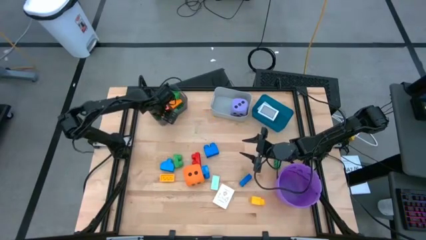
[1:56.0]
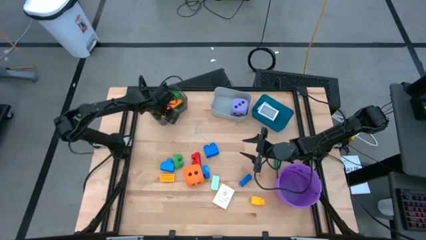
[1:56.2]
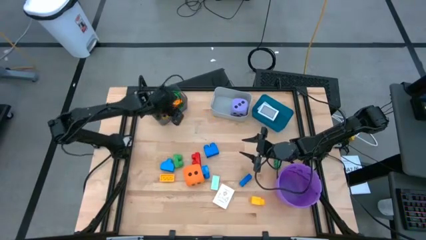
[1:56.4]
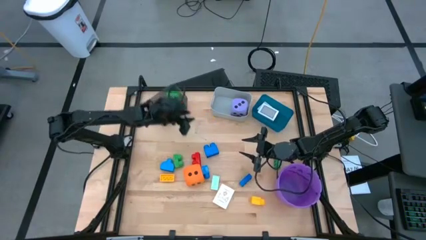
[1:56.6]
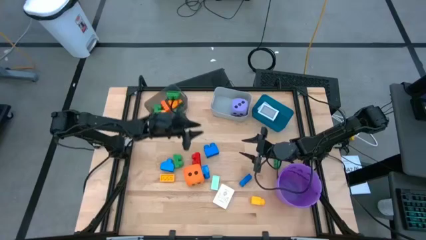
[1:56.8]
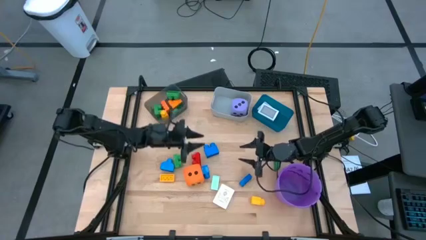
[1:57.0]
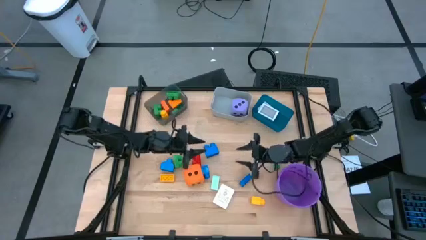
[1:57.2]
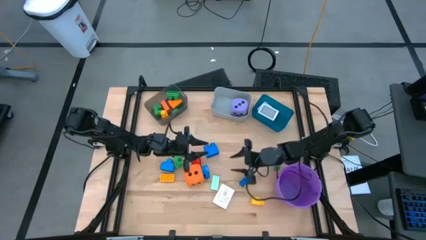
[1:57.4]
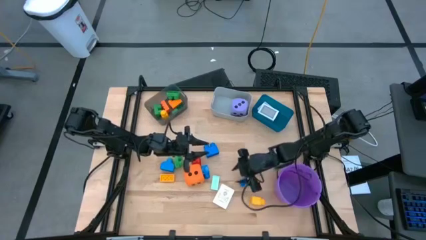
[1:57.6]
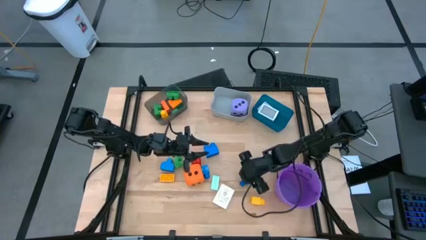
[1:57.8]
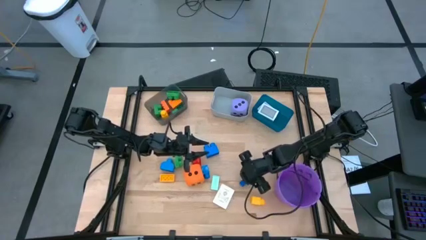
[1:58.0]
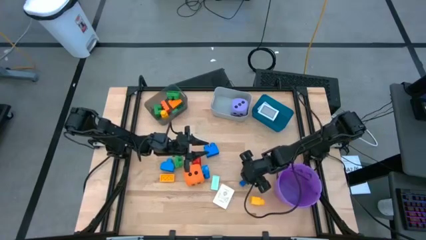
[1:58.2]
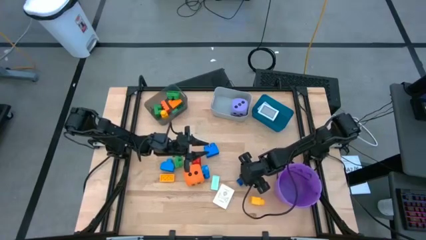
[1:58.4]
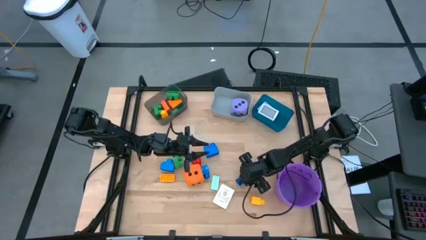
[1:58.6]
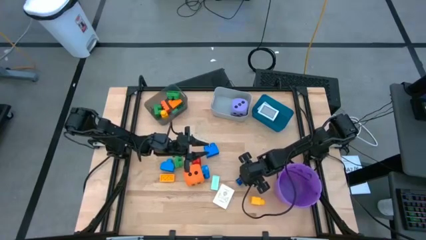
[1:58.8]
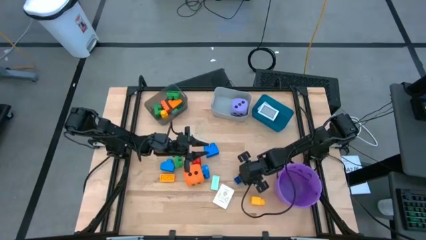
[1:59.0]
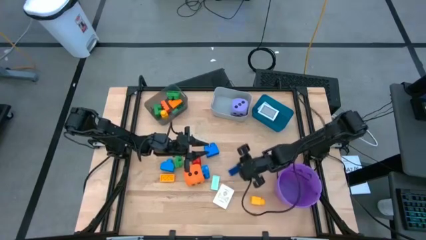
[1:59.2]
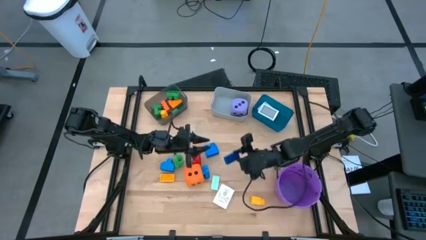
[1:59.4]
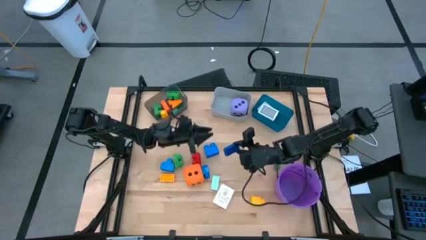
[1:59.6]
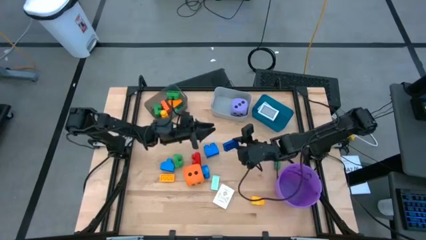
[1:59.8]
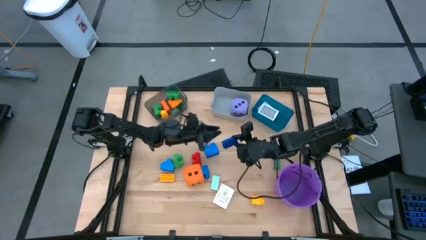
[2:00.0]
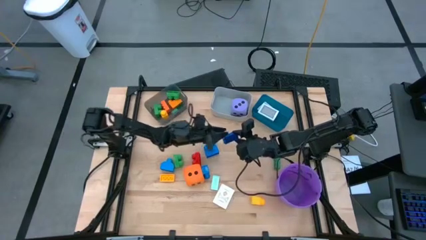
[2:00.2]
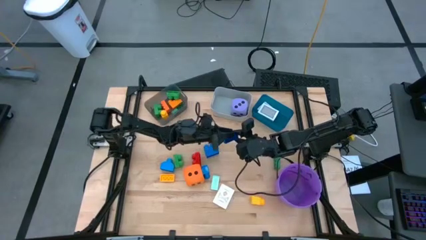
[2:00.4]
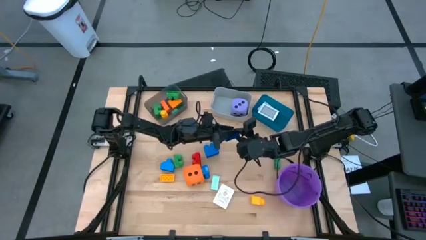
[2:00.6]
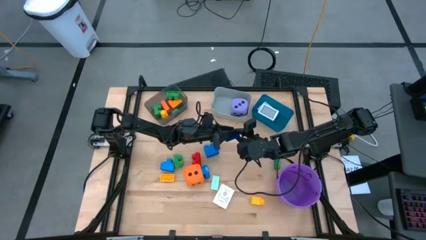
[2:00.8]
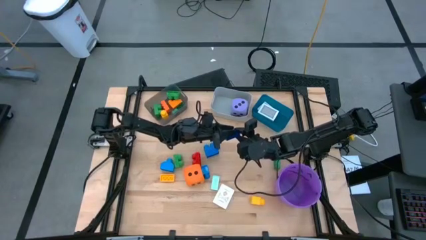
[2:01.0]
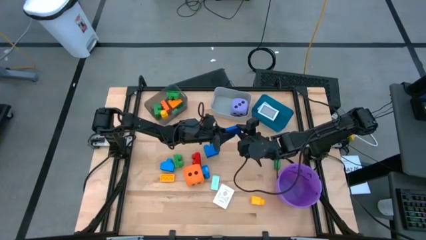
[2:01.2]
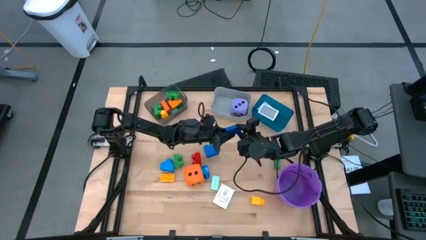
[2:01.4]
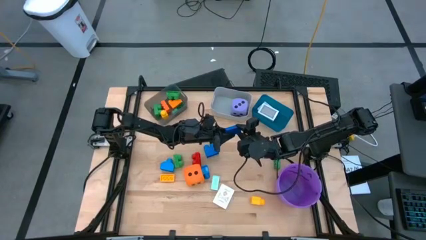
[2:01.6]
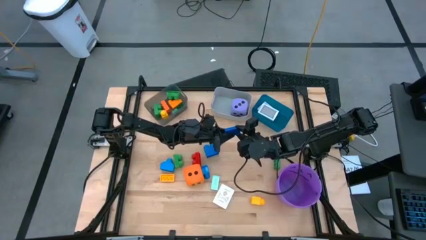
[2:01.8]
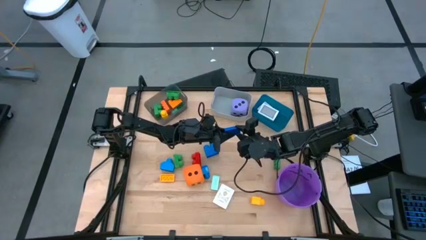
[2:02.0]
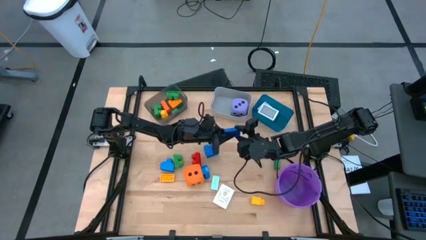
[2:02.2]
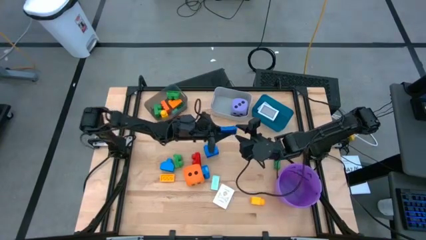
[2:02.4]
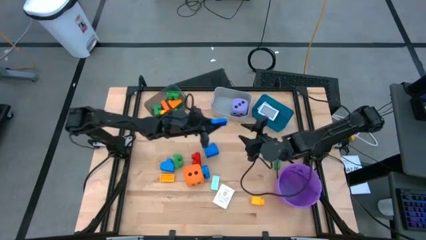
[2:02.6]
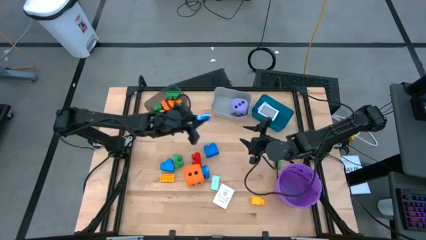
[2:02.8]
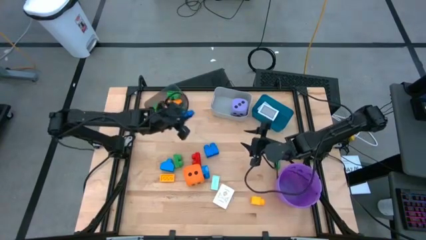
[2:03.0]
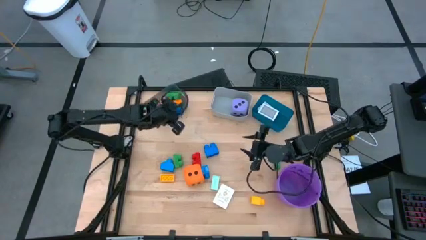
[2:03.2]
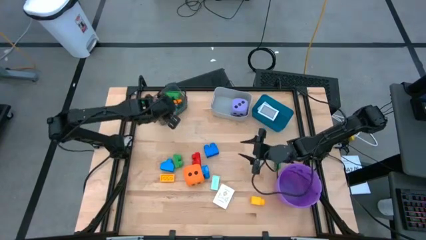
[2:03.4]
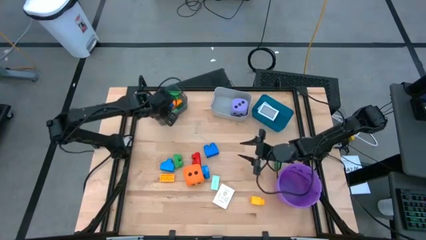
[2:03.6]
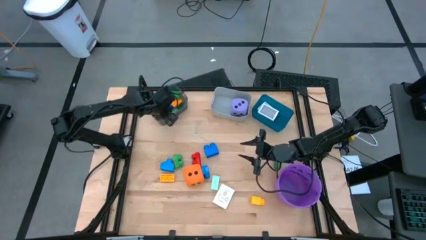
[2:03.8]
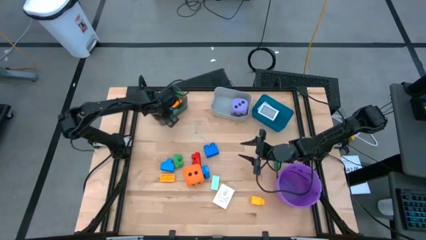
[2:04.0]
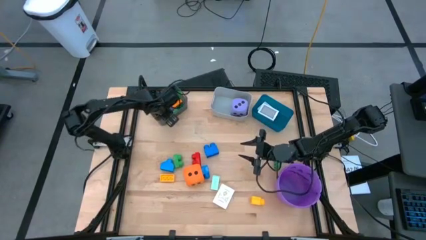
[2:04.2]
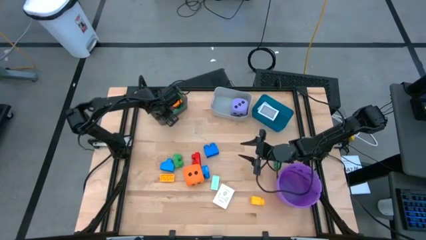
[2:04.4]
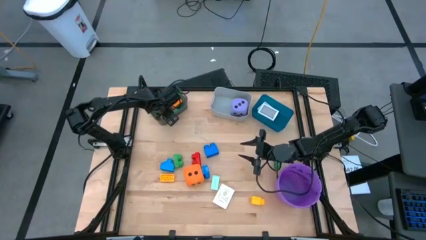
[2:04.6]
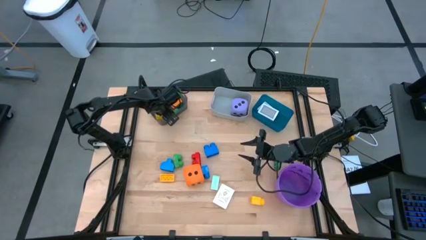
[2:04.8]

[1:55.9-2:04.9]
Task: Pick & Place Toys
Put the blue gamepiece into the black bin

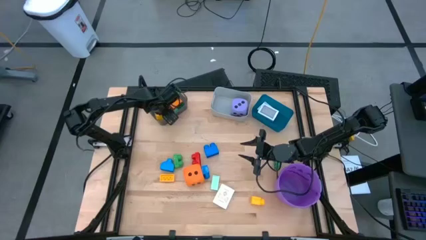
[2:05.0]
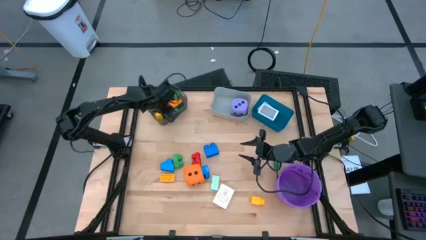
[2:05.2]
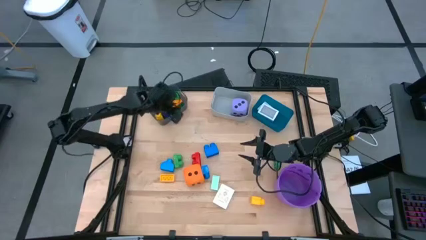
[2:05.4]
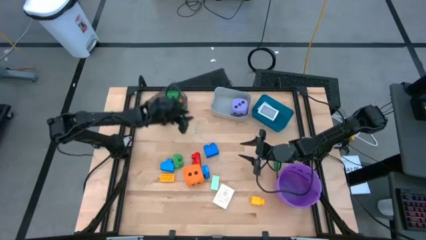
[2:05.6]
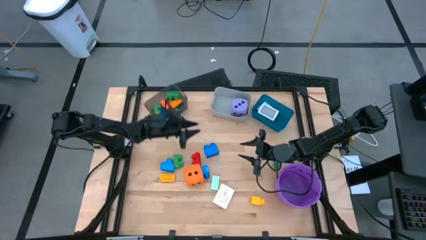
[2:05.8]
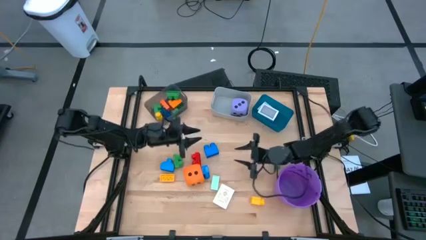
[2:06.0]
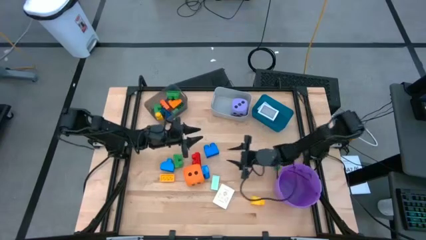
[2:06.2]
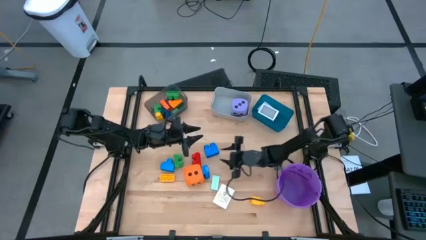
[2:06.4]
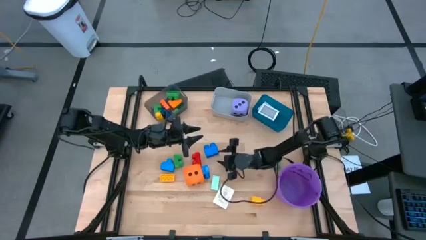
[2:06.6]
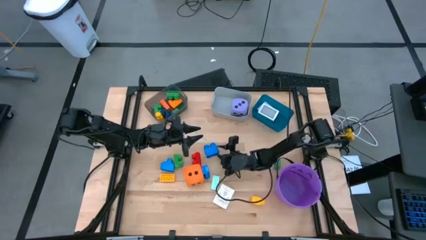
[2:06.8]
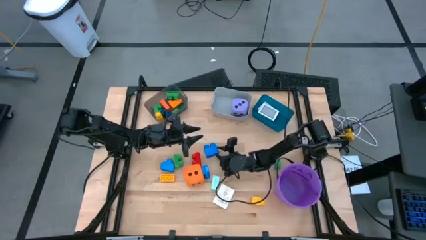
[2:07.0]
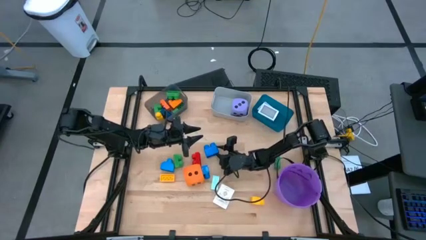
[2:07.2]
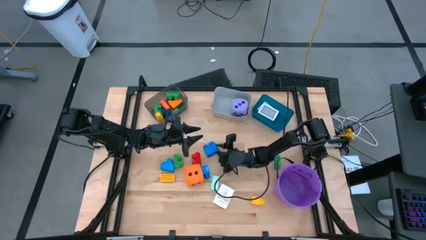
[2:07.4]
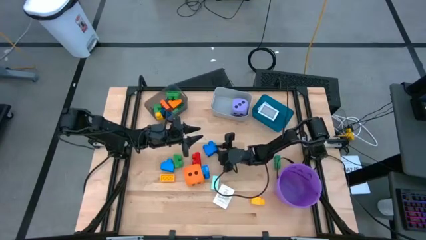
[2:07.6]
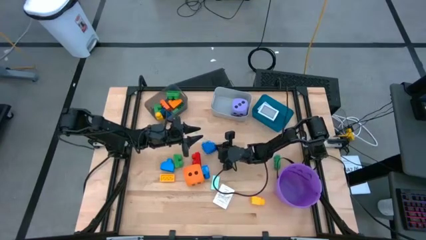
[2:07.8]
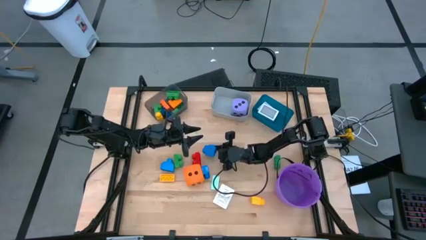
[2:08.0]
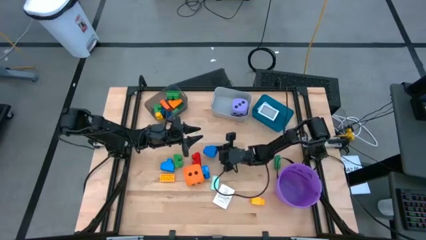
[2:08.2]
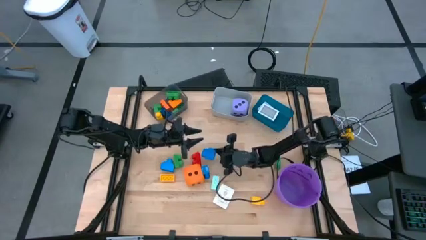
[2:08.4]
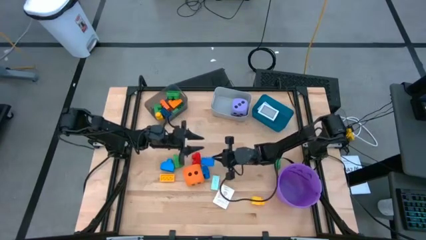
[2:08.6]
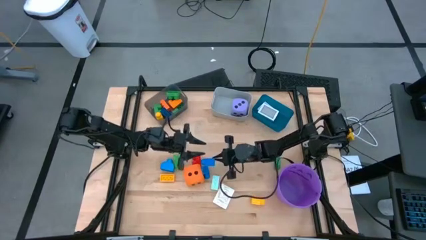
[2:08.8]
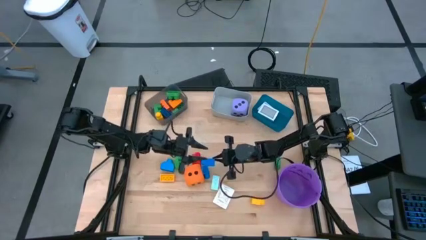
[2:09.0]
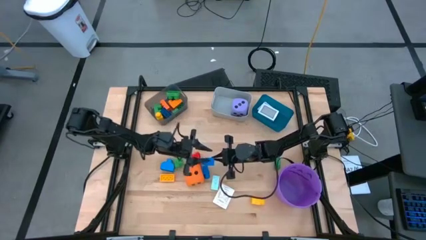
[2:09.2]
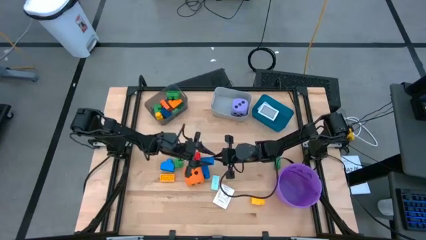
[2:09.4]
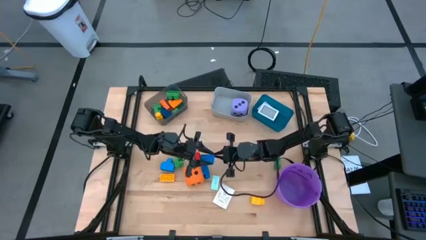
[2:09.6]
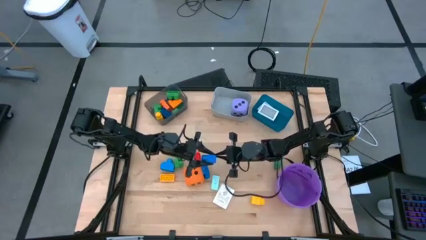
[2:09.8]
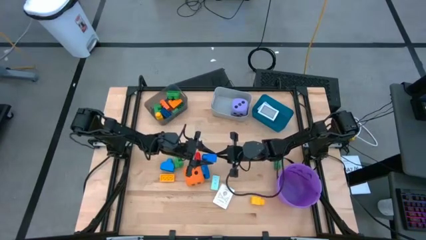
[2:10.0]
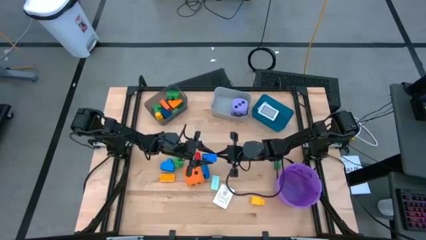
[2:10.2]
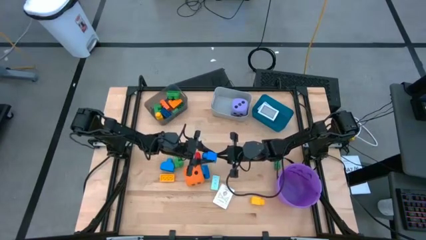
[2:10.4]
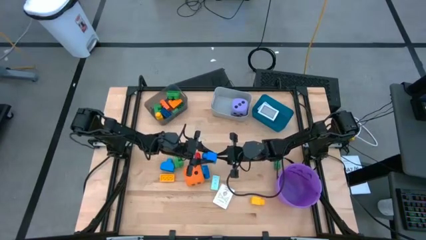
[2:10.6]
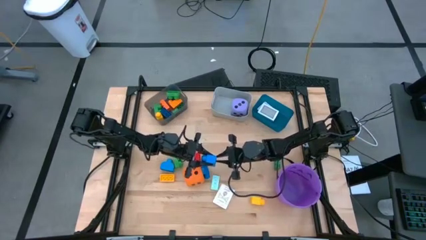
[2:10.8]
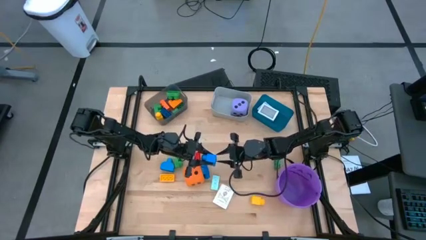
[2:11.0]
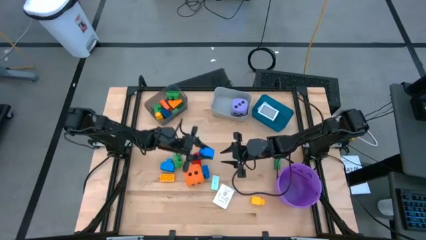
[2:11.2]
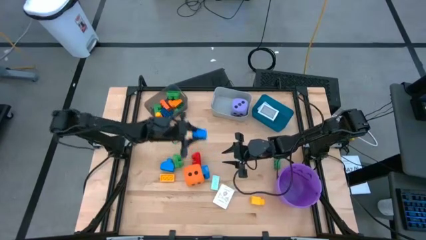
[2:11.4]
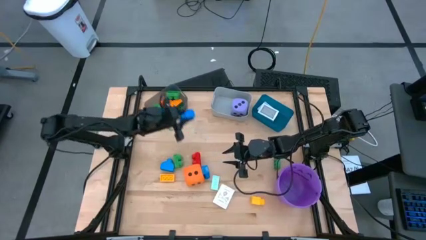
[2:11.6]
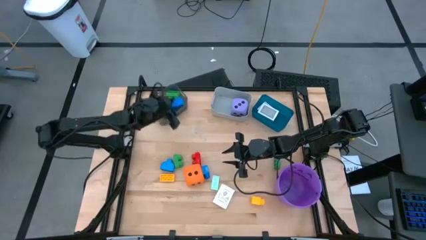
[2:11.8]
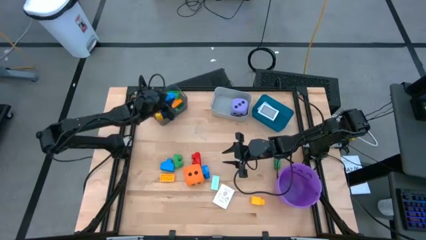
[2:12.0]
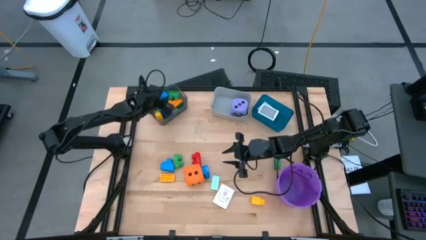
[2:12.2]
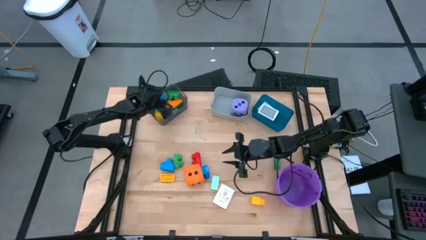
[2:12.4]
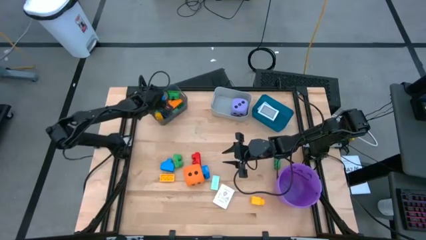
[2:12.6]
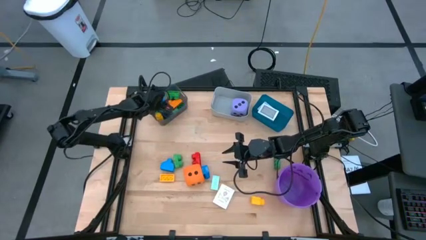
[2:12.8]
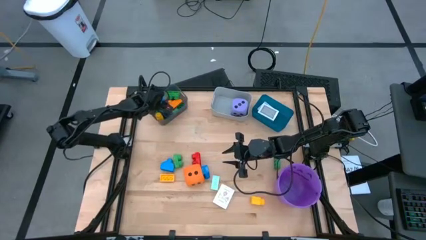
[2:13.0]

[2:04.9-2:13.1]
Put the blue gamepiece into the black bin
